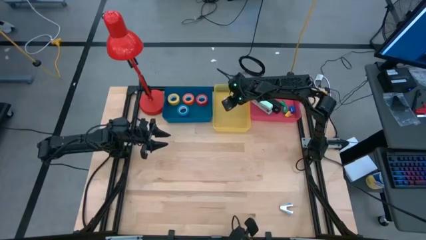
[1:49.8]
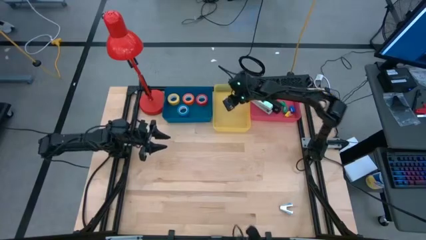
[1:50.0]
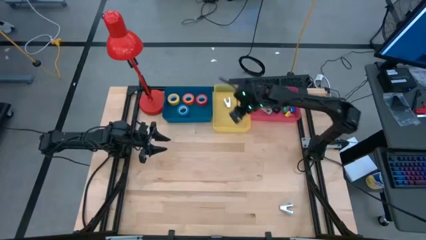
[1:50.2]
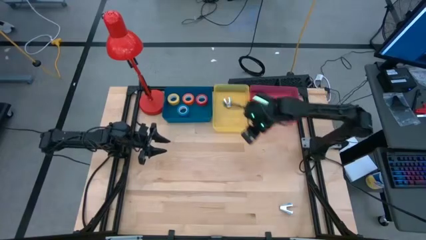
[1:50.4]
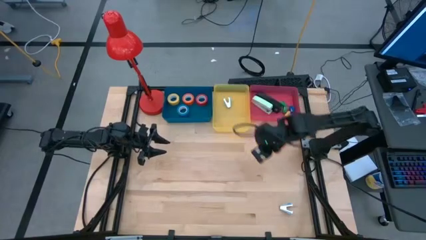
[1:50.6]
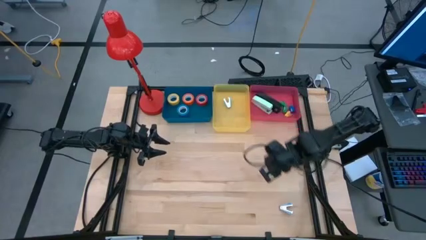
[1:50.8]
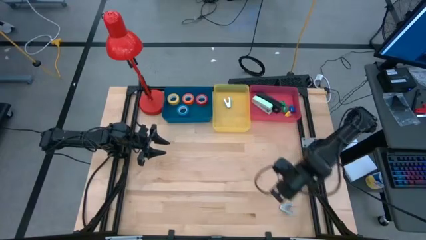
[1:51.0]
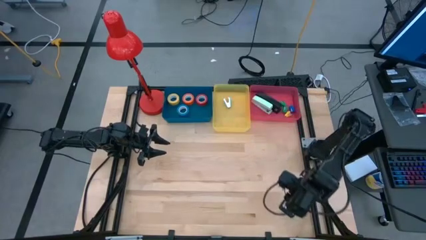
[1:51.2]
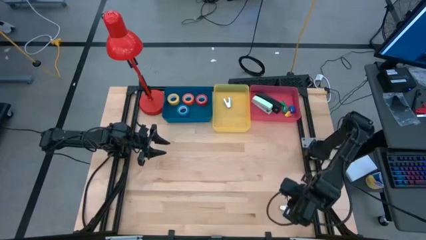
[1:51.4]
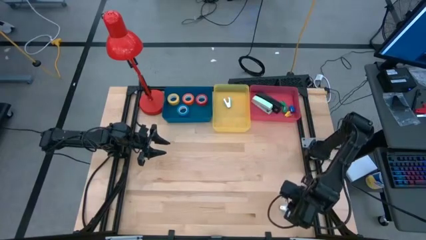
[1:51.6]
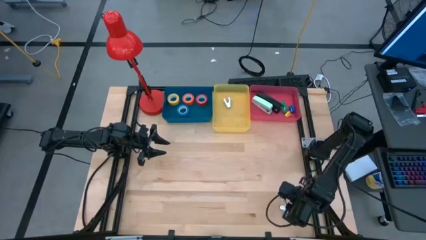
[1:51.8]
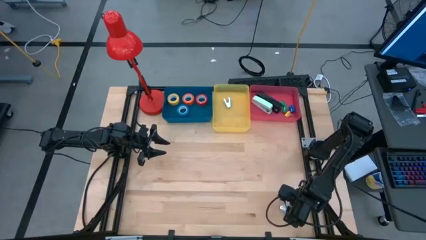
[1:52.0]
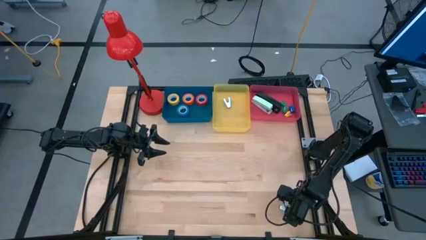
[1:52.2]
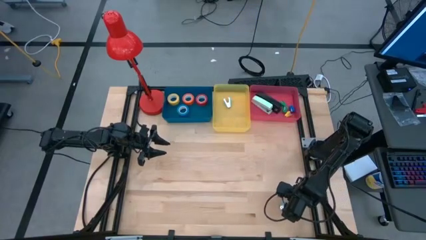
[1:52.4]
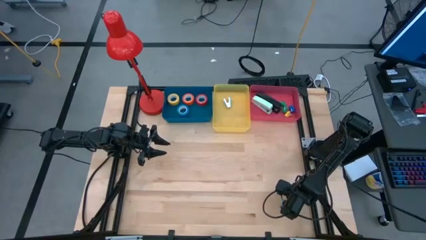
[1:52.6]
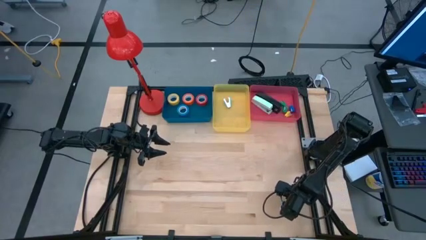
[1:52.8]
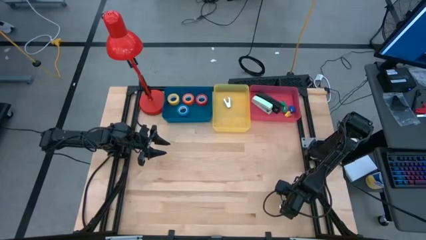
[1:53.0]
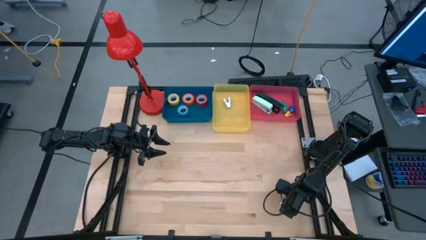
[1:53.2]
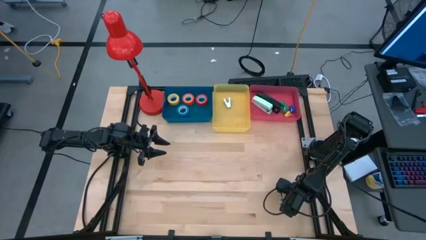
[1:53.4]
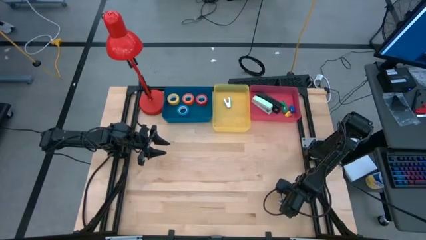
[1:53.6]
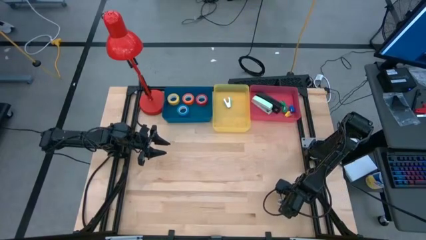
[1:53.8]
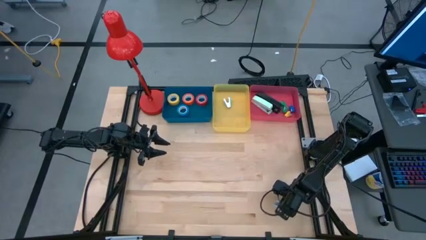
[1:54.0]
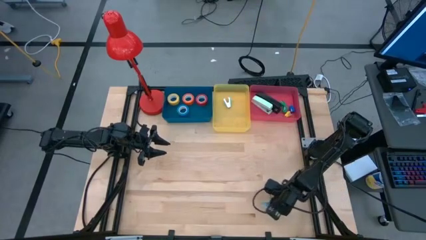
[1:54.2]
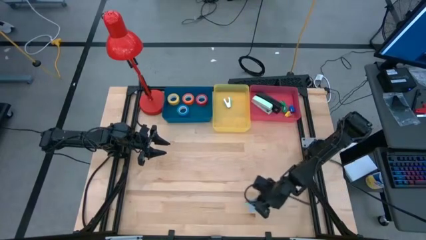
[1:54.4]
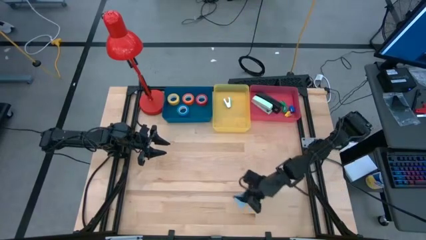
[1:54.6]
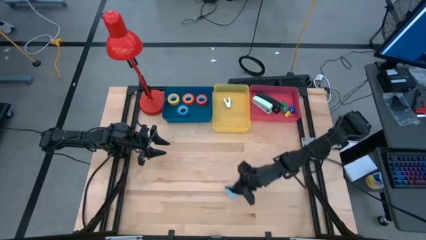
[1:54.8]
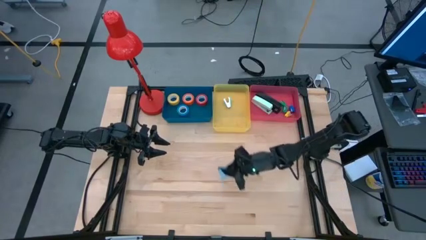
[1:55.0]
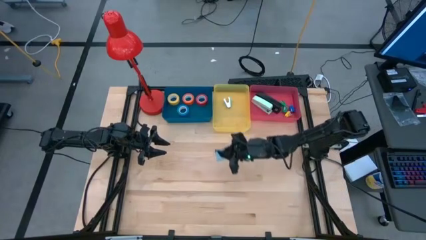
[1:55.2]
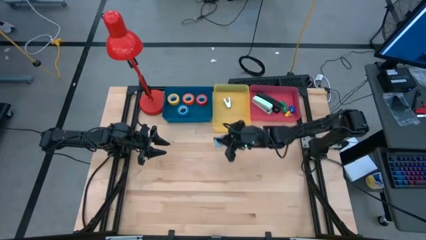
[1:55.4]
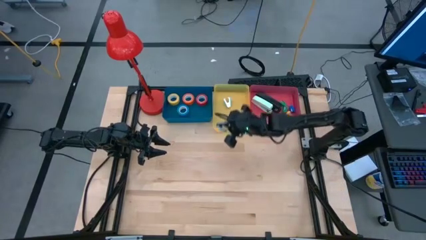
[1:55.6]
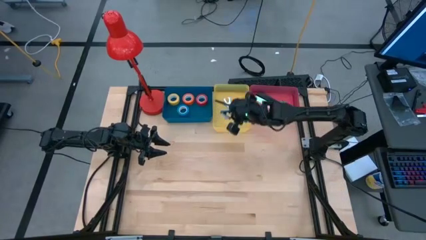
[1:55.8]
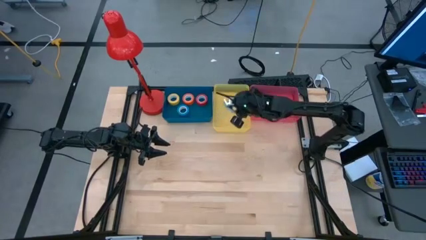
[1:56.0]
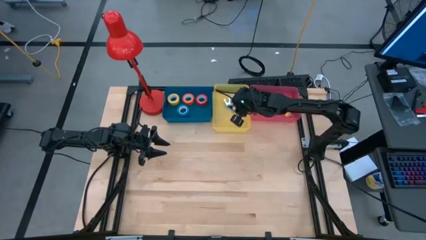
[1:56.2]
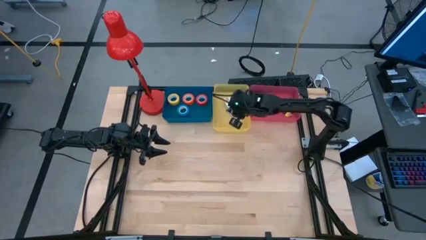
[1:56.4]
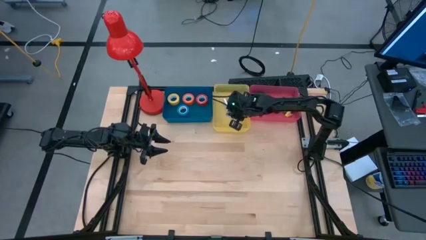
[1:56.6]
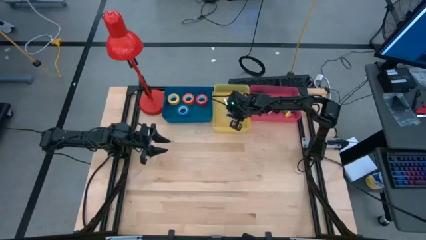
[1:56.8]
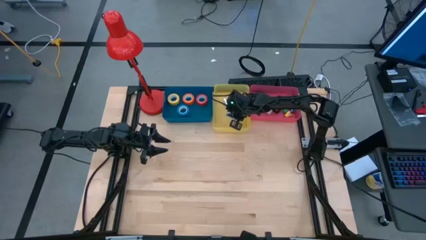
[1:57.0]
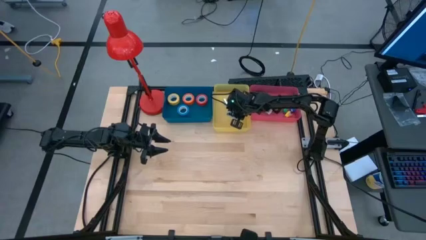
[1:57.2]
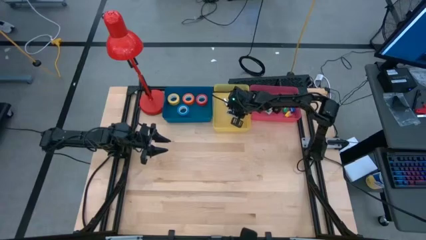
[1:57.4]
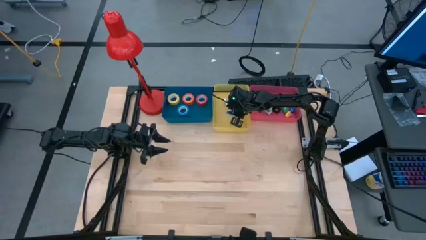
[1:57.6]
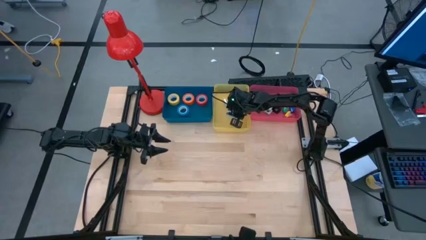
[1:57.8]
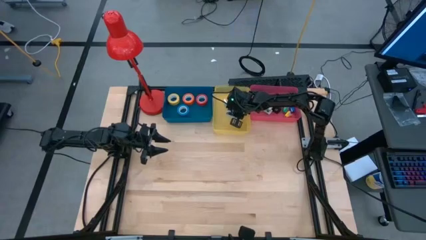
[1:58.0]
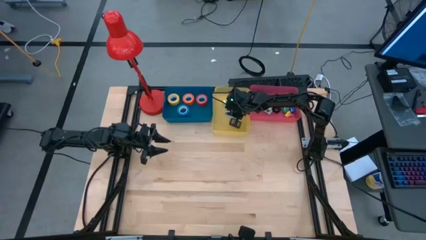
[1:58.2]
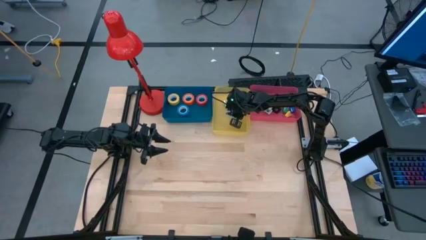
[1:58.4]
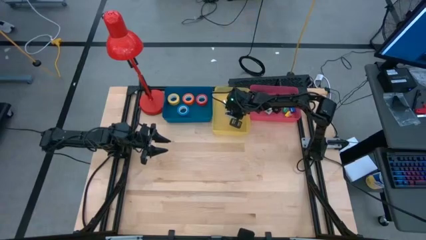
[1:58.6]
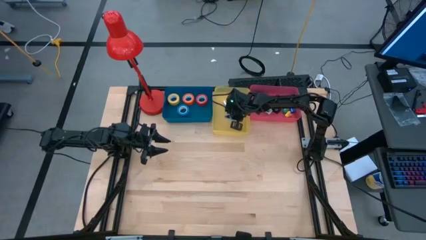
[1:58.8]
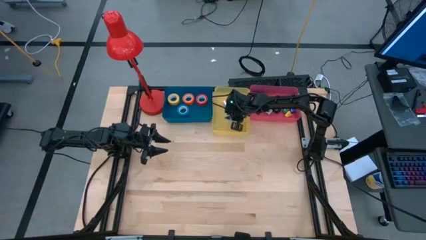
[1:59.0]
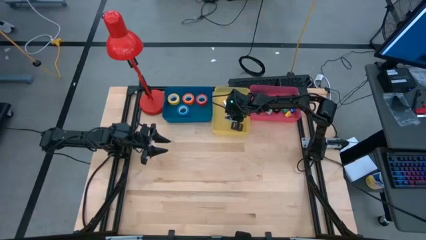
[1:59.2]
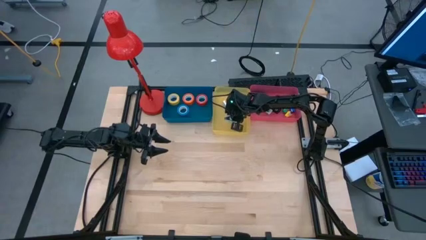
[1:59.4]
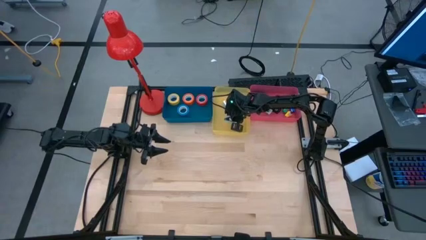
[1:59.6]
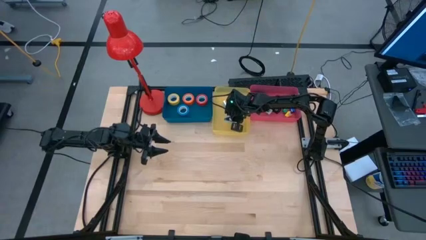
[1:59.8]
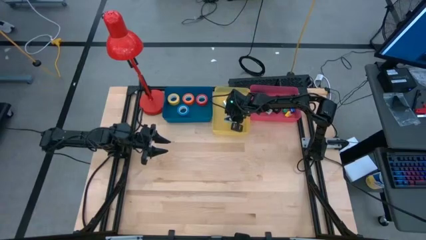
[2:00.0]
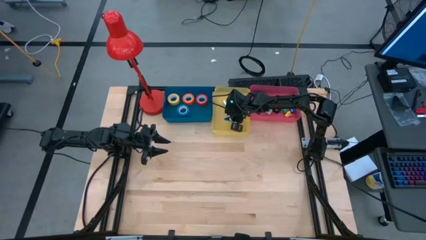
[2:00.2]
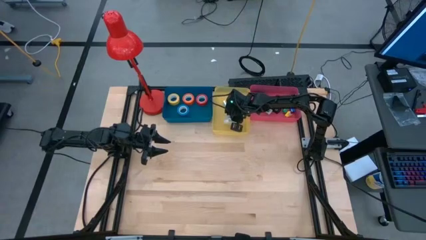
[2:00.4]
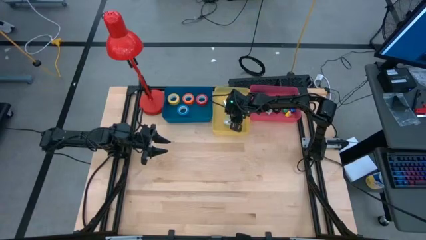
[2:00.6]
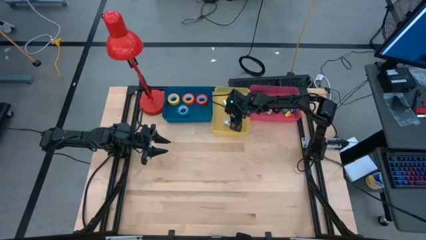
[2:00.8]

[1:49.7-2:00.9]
Task: Pick and place Stapler, Stapler remover, tape
Put the light blue staple remover into the yellow bin

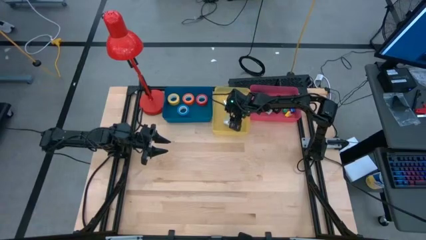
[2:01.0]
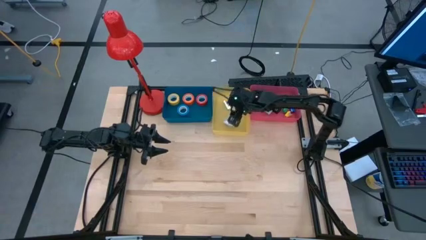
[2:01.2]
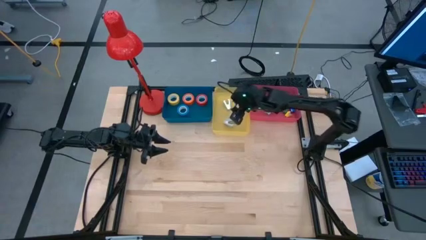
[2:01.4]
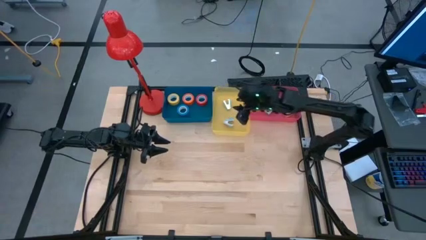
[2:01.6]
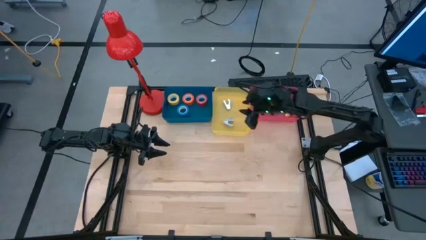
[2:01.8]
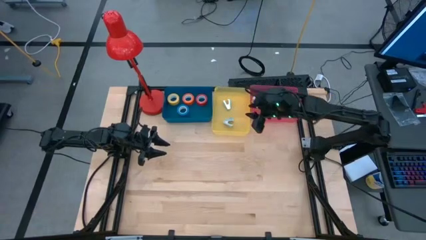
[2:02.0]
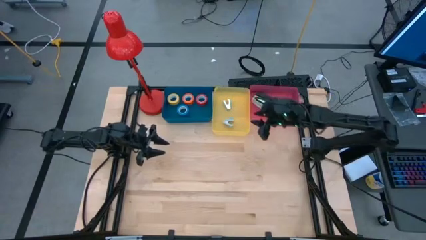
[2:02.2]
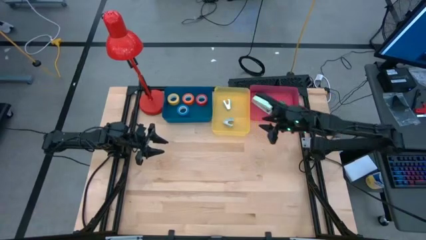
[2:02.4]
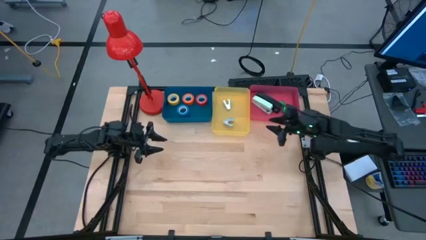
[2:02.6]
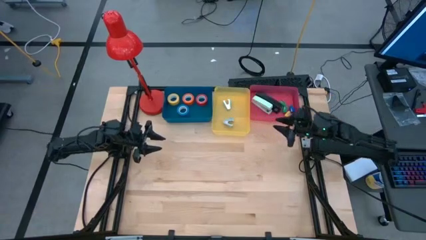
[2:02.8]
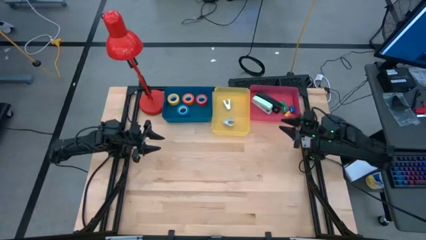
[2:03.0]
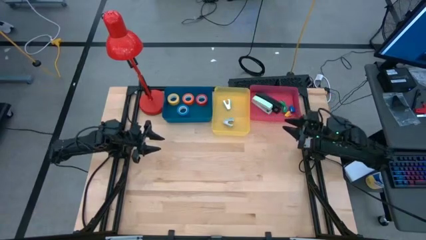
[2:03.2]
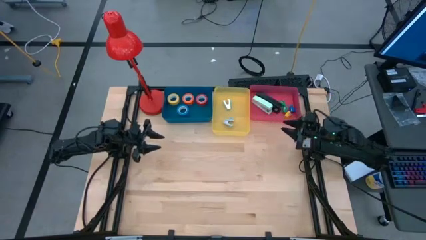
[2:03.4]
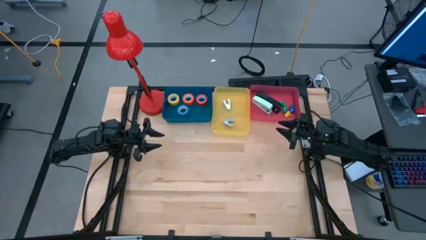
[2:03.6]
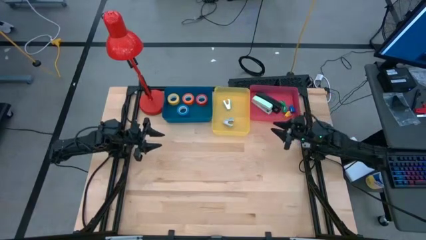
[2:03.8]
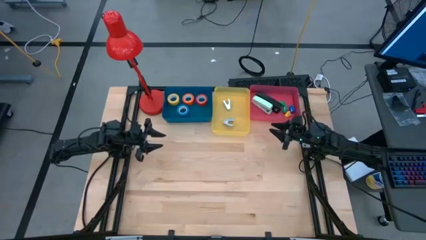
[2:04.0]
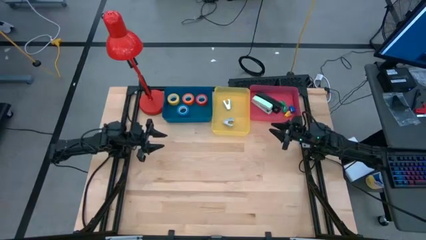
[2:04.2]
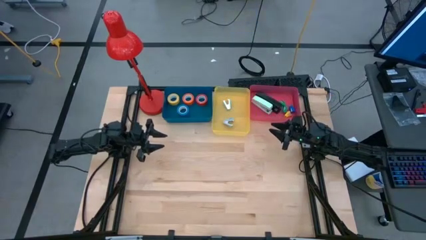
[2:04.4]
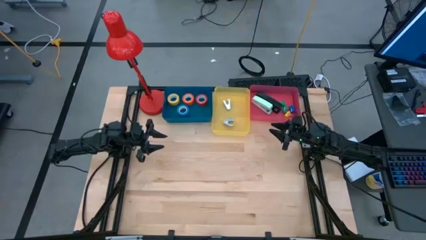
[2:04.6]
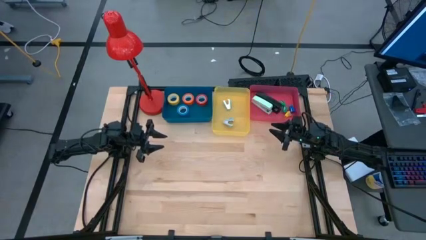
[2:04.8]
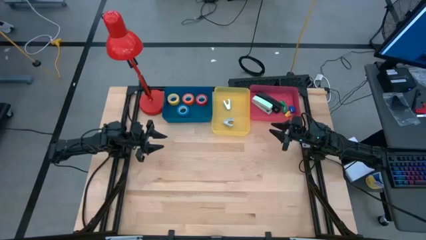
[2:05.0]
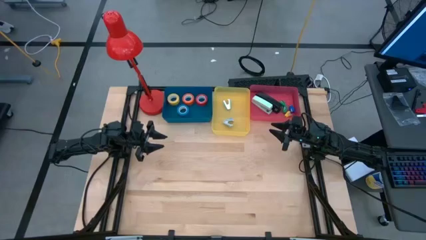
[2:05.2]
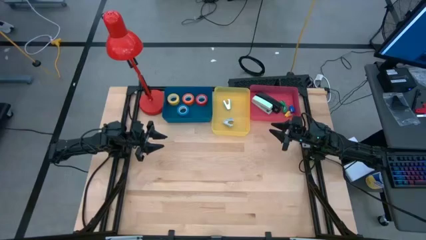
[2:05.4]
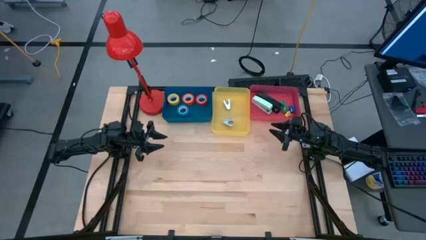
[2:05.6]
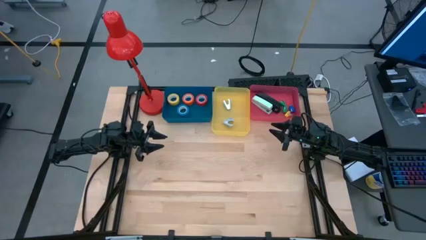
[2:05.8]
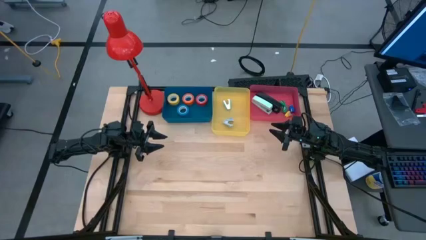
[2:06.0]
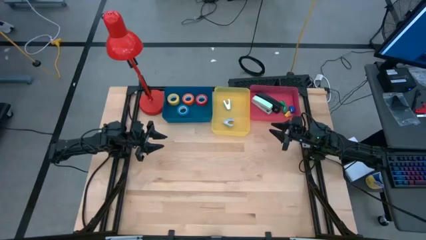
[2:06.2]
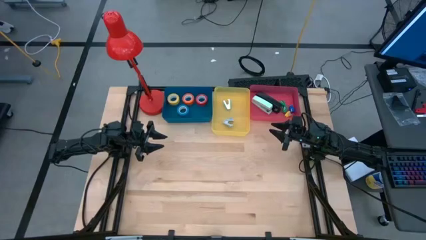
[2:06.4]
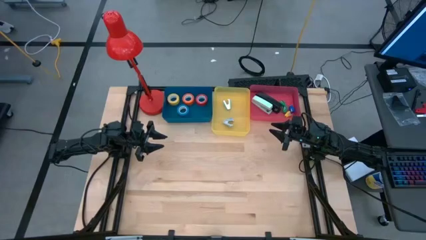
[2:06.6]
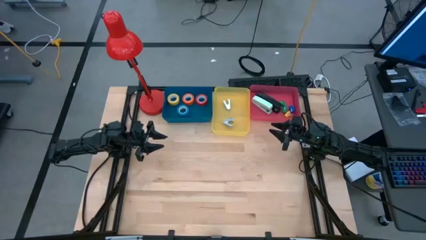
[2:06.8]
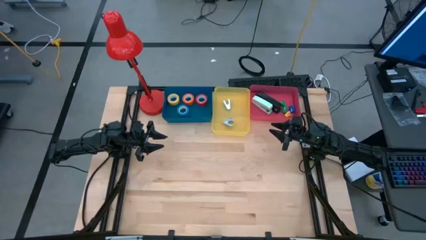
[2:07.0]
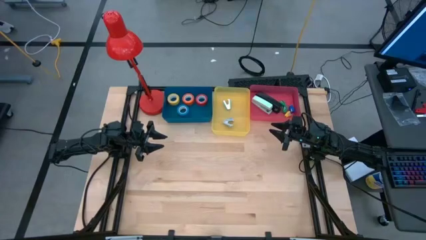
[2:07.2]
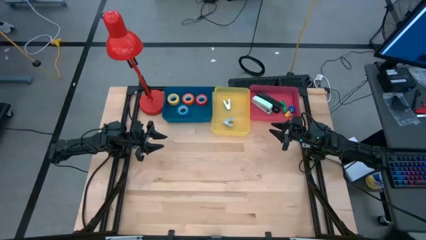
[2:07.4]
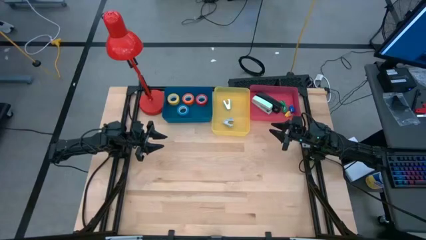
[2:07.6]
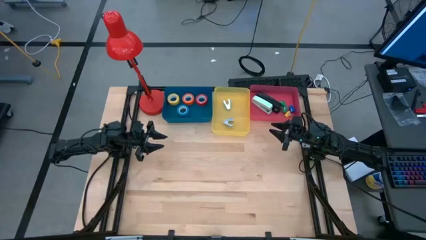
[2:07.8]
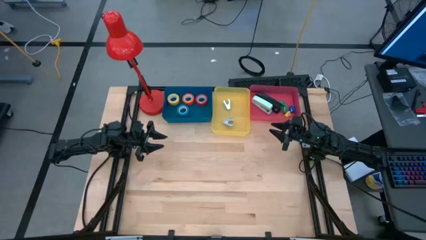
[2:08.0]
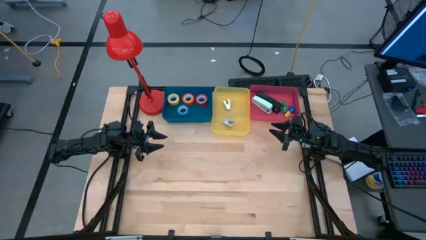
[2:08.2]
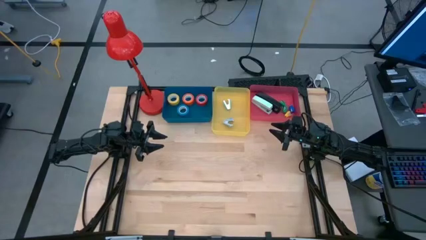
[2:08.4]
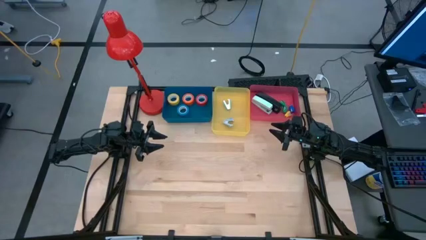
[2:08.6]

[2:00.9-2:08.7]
Return to Home Position
